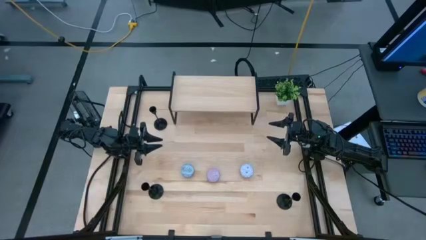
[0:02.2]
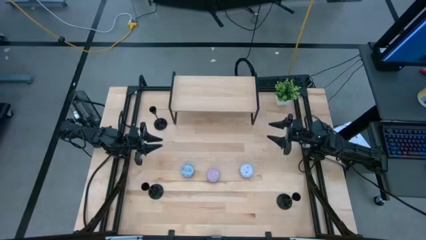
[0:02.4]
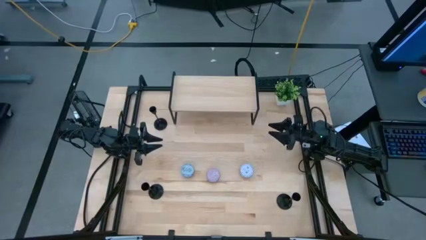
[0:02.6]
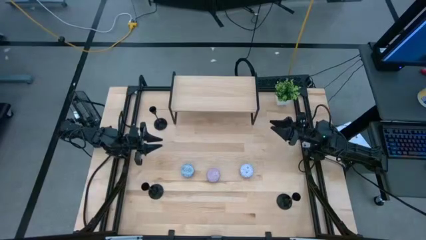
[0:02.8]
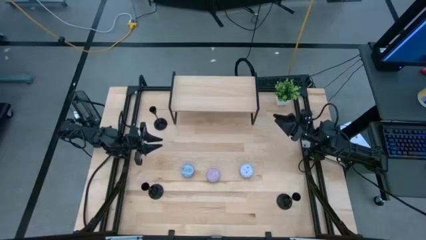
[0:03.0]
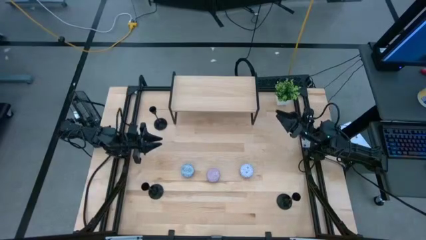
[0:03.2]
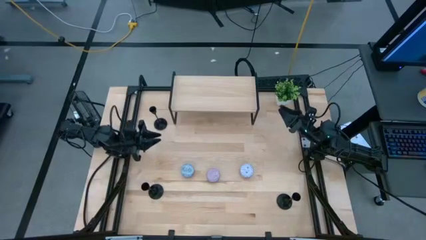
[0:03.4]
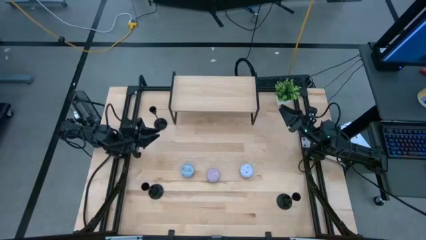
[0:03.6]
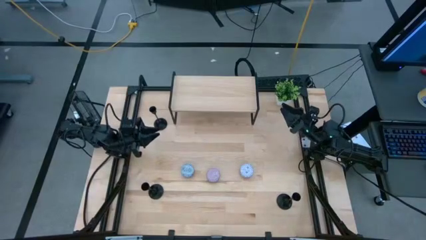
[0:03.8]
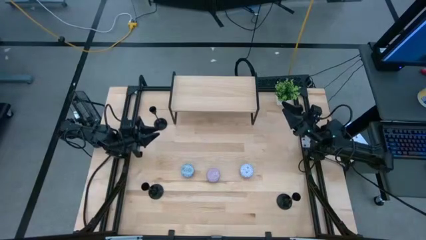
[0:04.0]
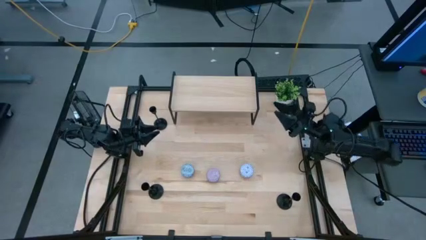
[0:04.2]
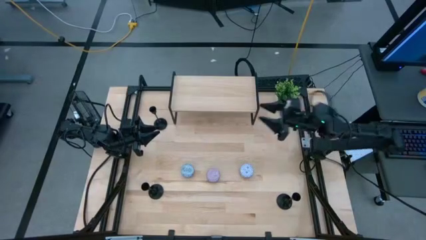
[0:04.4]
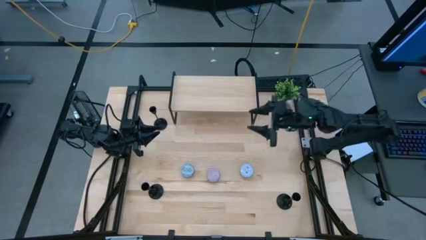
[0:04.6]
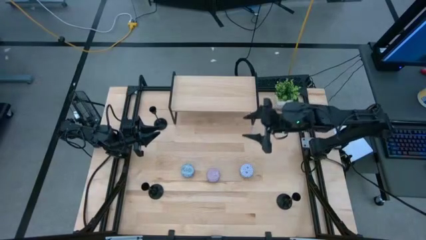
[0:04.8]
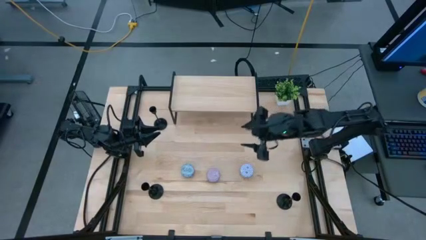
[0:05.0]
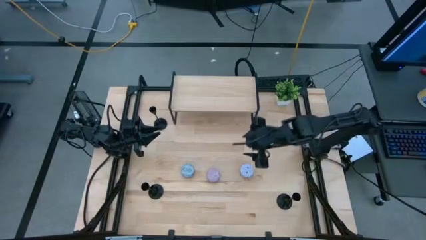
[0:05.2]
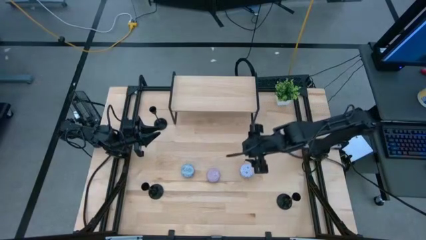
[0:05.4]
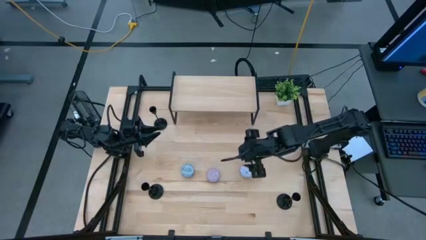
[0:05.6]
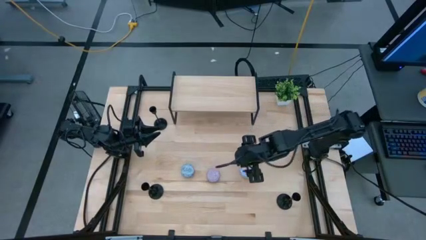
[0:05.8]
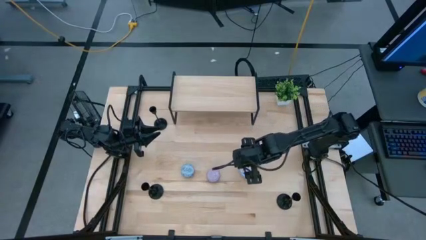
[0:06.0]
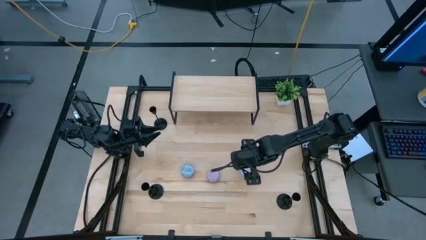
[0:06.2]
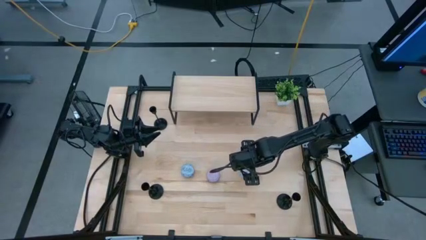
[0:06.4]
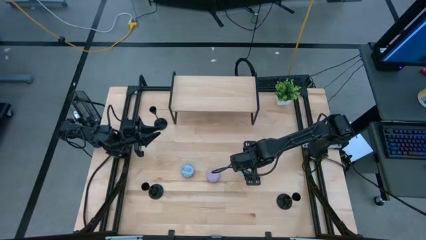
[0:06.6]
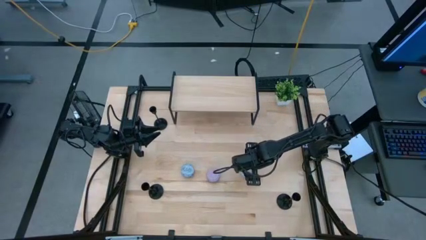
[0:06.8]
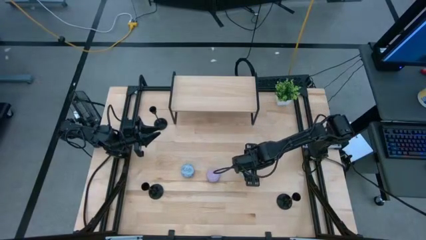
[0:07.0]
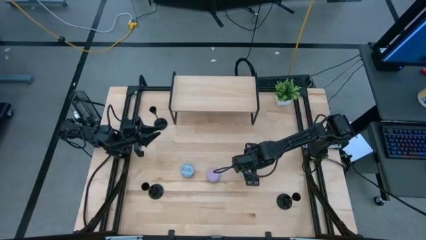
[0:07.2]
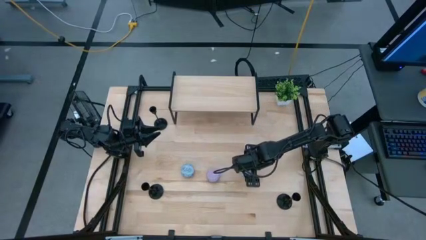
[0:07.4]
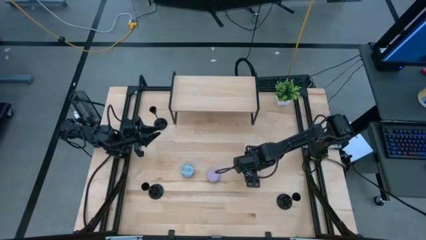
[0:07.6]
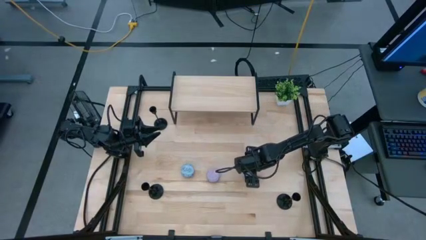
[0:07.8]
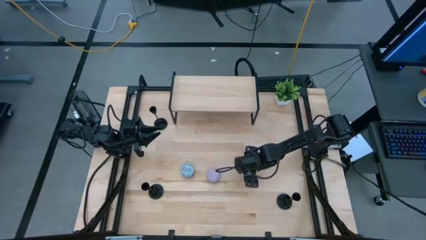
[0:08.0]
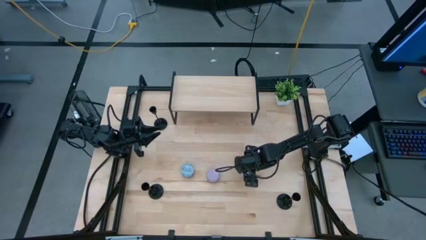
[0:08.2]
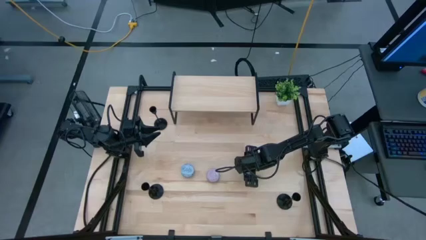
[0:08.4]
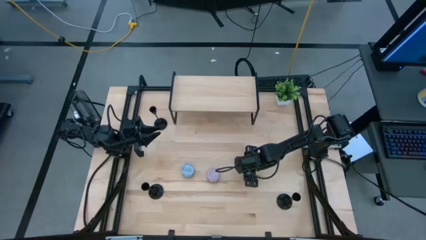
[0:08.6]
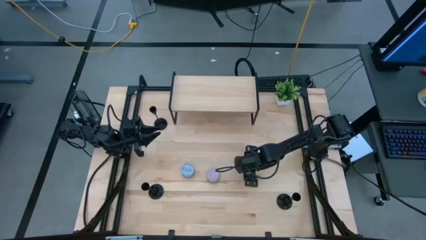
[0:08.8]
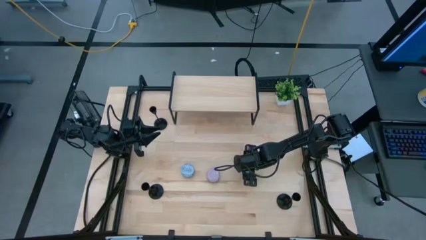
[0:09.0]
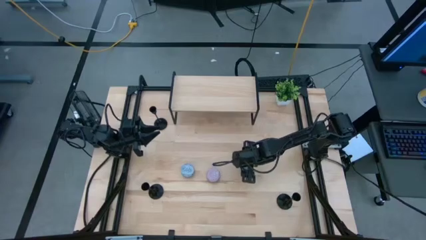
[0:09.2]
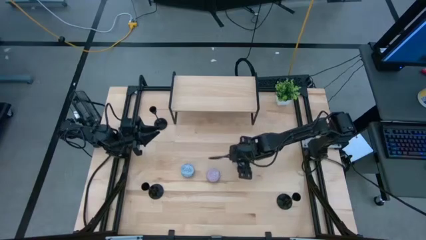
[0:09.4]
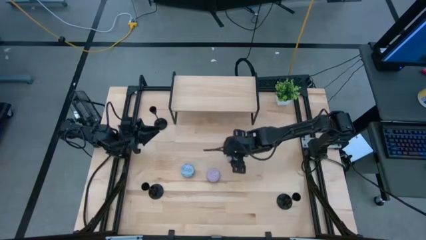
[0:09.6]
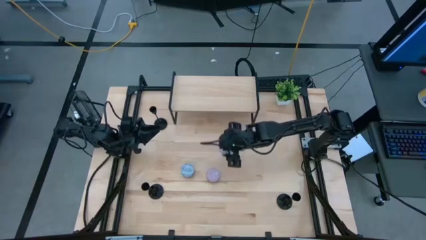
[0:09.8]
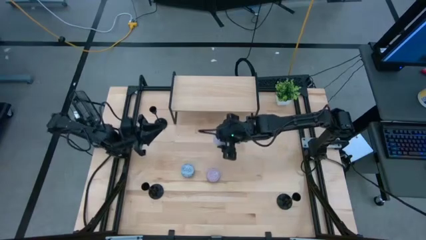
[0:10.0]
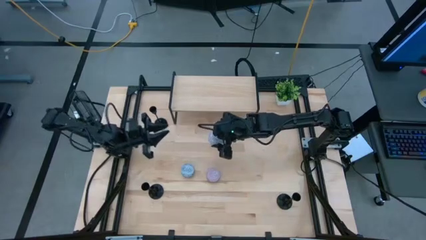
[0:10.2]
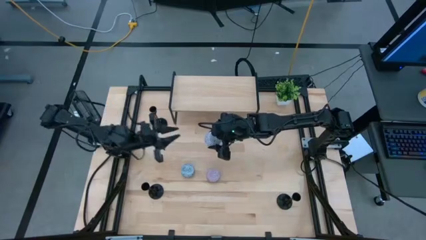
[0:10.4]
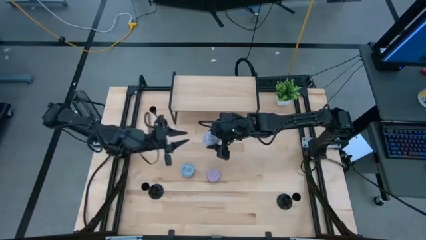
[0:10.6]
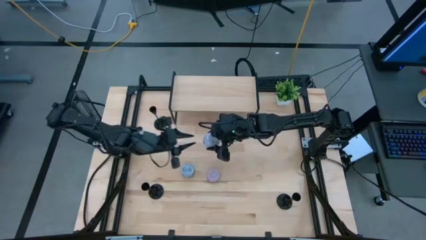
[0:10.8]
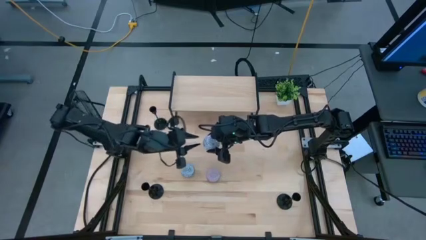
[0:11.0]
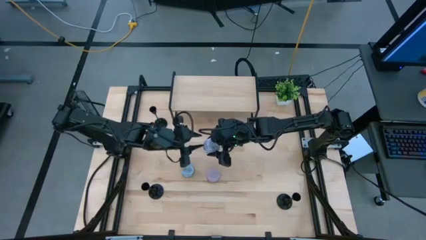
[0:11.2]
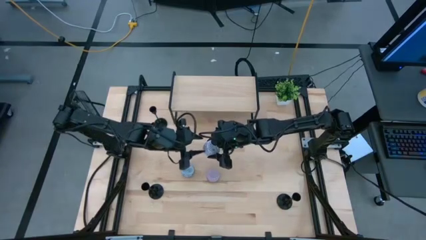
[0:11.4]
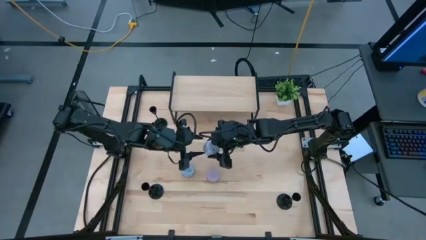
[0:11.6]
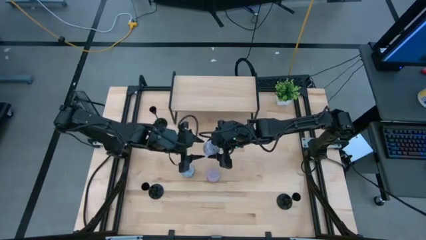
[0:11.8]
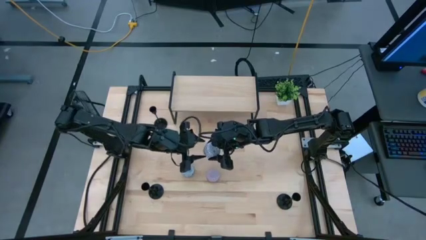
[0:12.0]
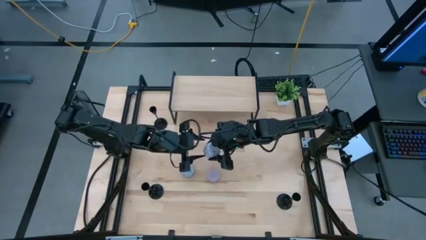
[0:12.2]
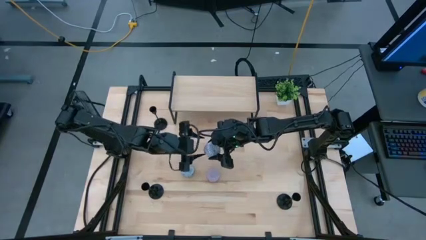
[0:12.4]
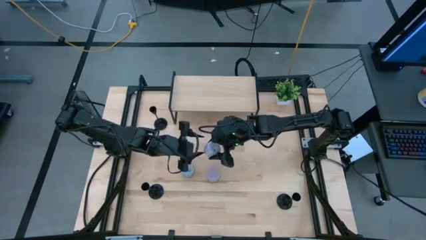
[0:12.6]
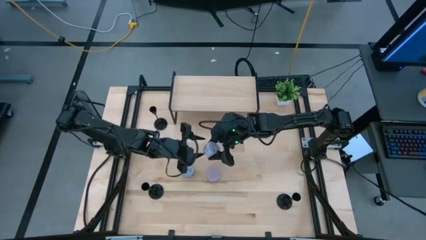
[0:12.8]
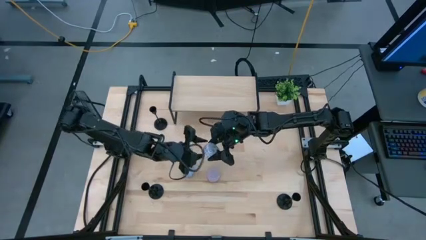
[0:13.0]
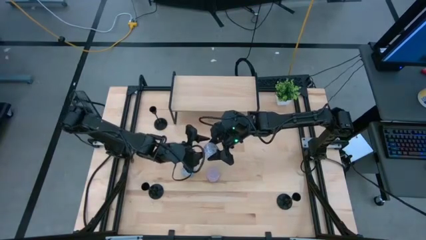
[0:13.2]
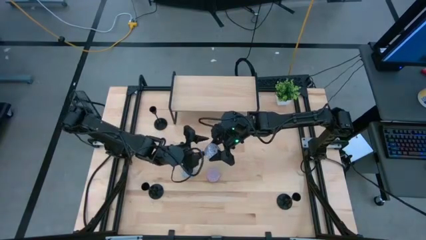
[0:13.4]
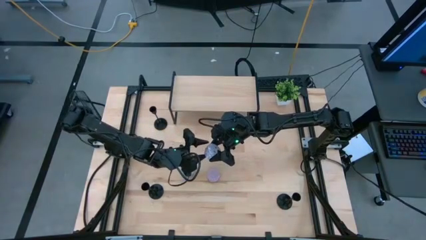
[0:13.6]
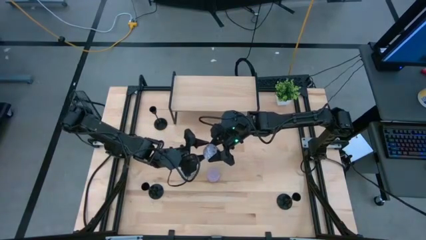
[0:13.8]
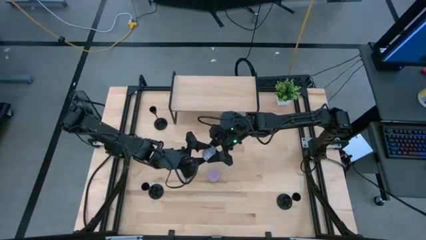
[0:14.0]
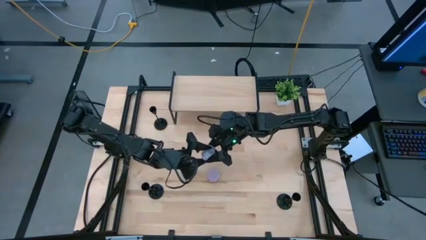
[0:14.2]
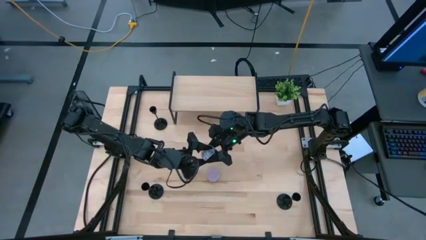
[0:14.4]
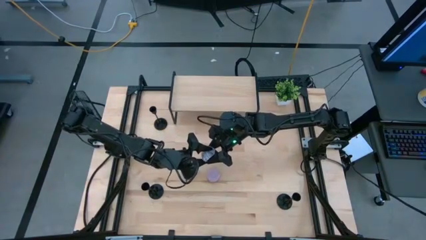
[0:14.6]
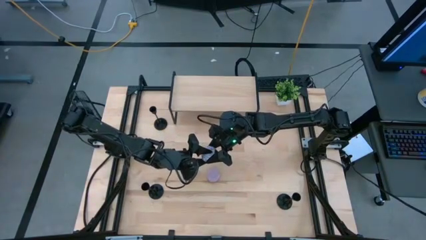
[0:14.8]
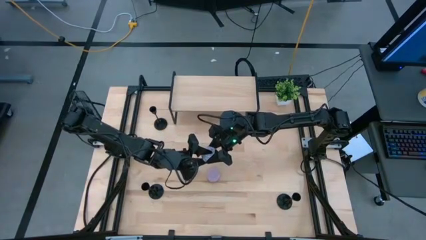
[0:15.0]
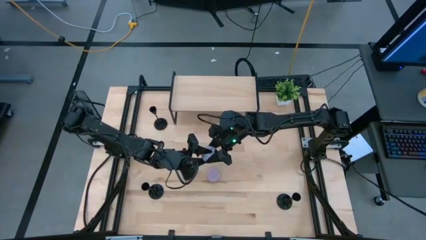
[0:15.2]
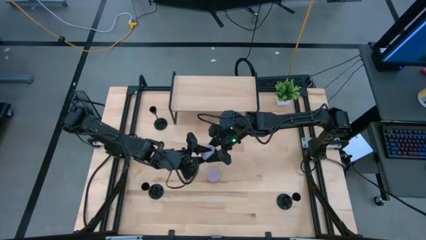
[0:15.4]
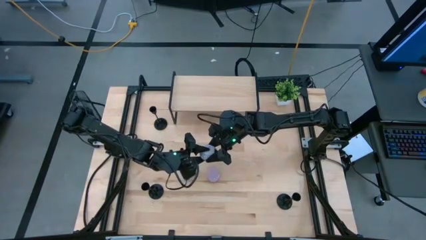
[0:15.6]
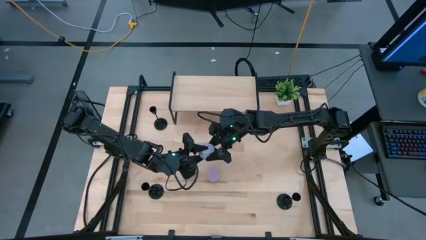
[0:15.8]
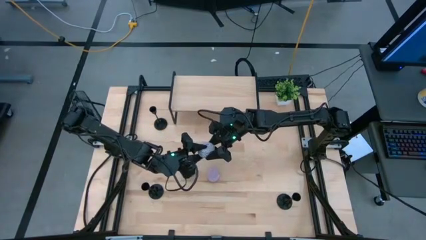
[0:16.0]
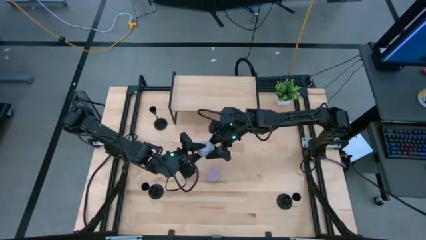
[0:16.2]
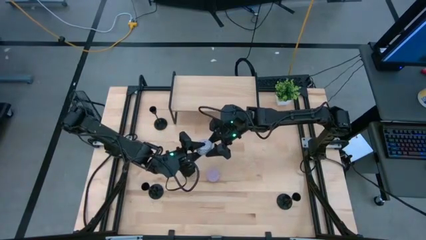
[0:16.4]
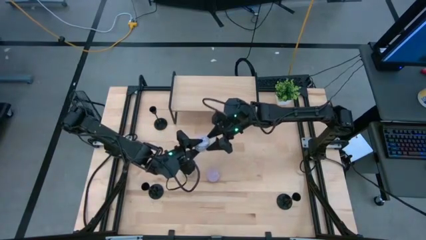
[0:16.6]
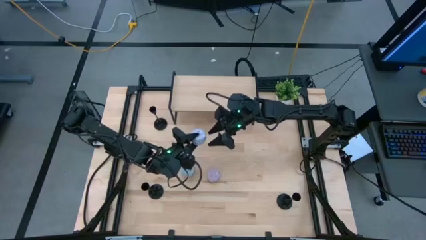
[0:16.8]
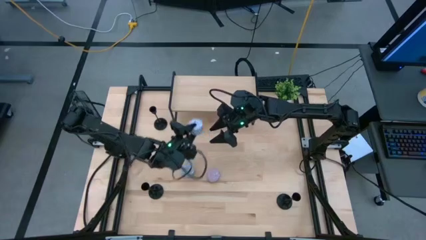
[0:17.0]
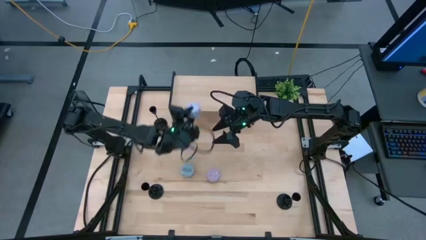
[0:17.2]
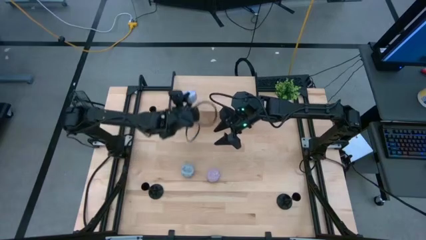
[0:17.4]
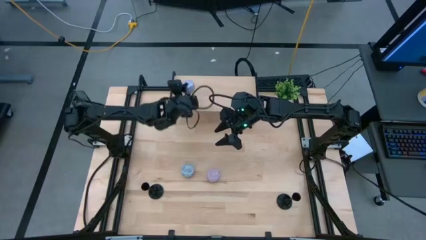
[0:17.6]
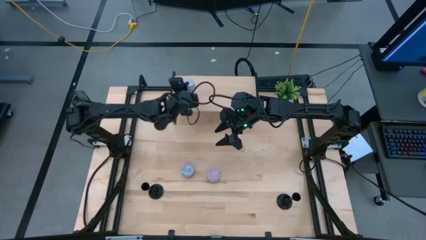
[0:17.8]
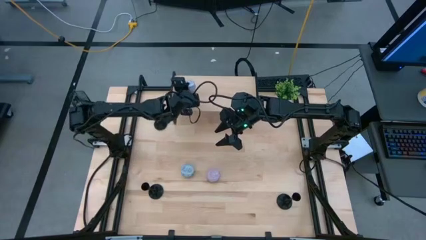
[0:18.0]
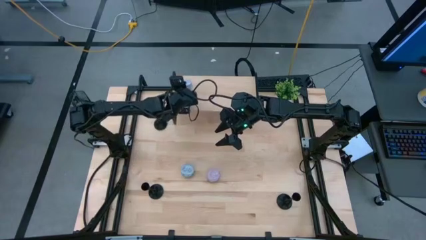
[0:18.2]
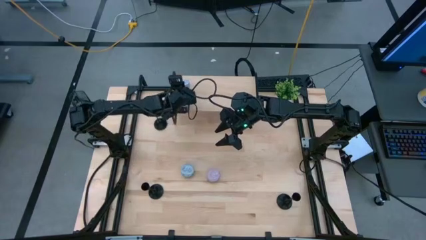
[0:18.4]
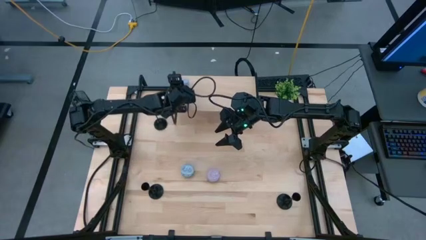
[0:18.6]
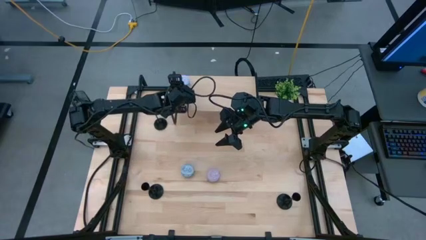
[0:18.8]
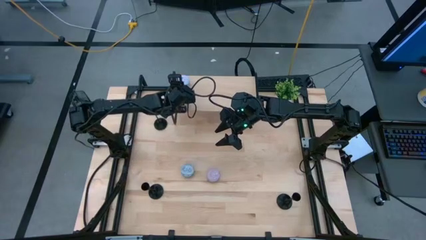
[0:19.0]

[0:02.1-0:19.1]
Task: Pick & Place candle stick holders
Put the white scented candle on the shelf
